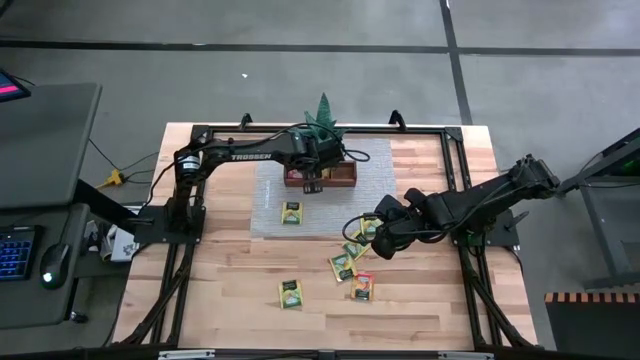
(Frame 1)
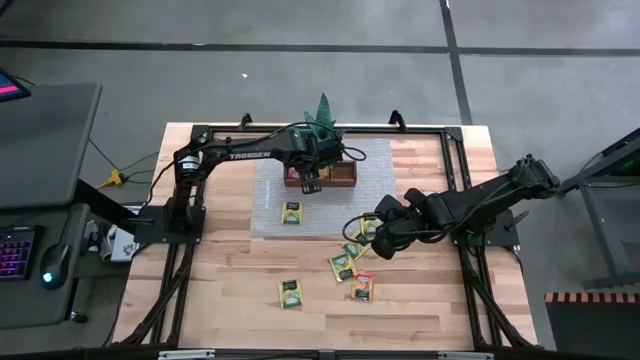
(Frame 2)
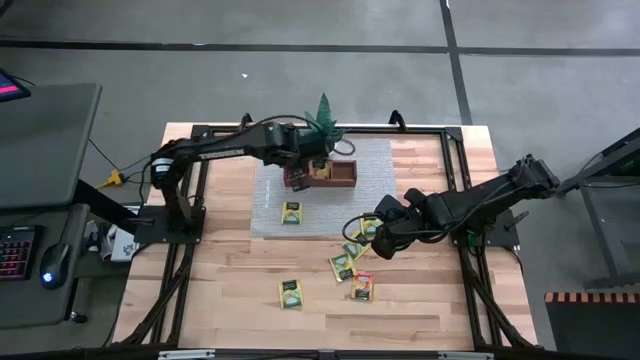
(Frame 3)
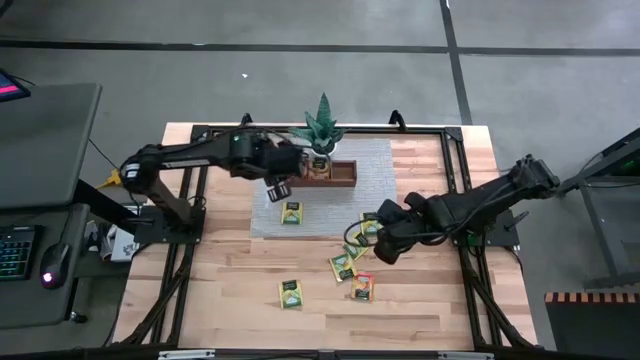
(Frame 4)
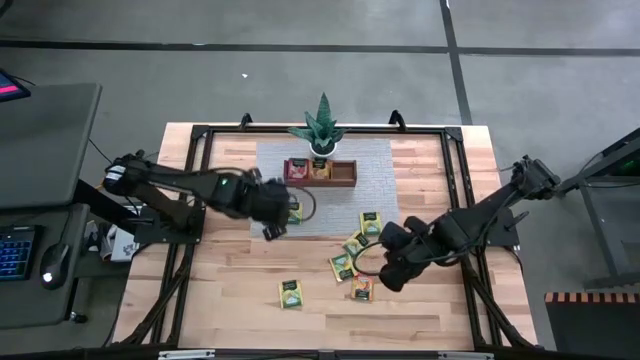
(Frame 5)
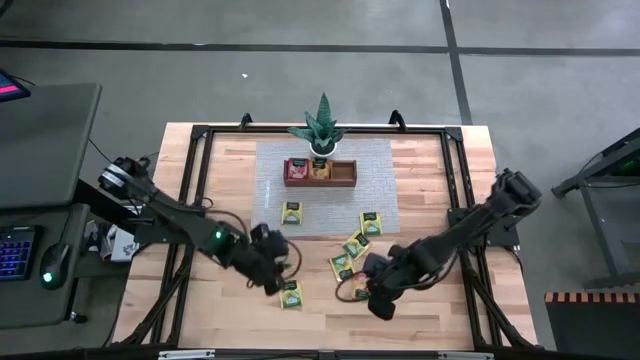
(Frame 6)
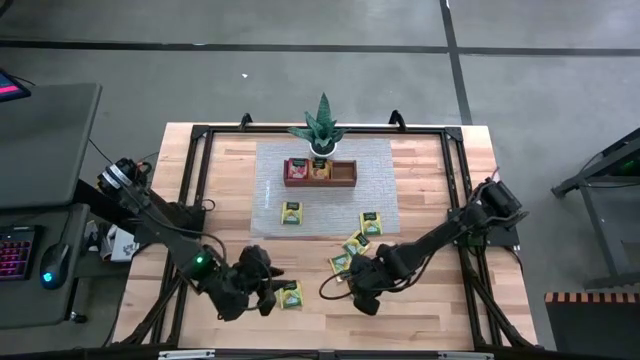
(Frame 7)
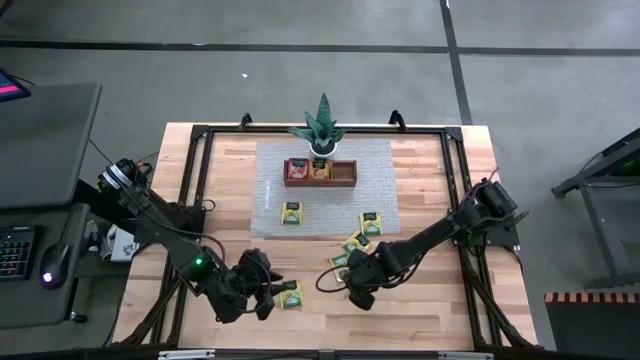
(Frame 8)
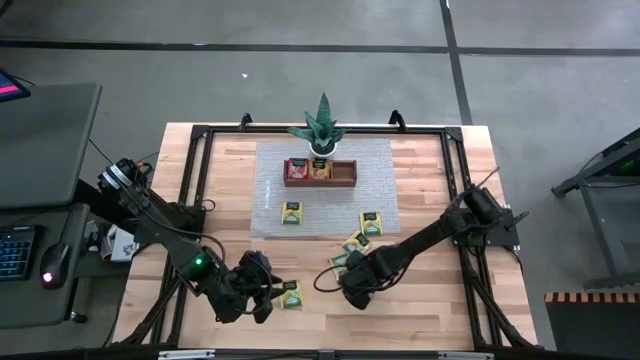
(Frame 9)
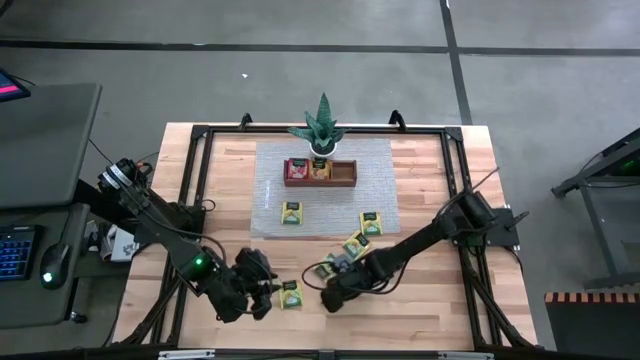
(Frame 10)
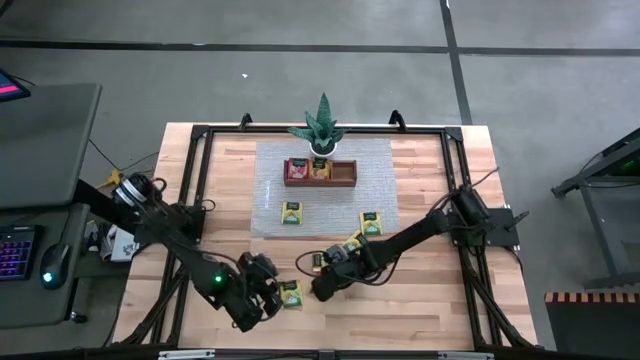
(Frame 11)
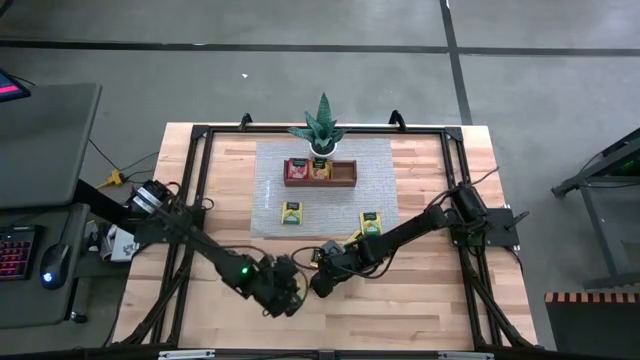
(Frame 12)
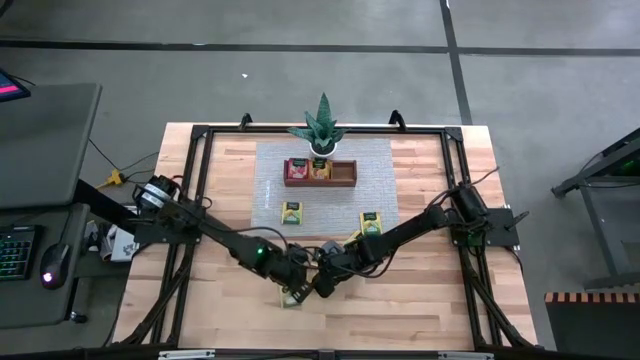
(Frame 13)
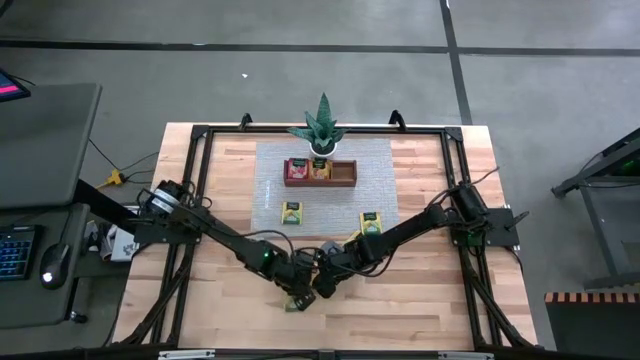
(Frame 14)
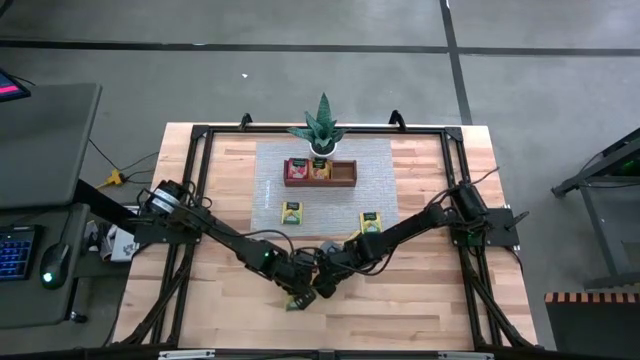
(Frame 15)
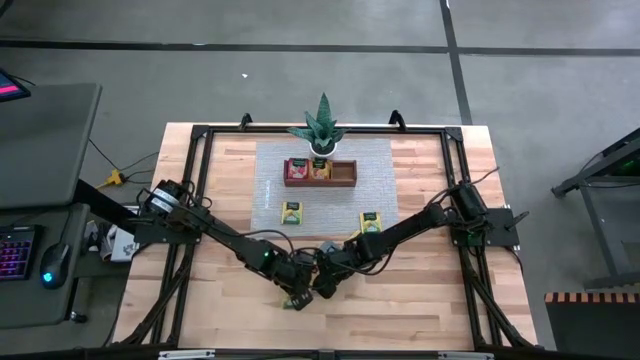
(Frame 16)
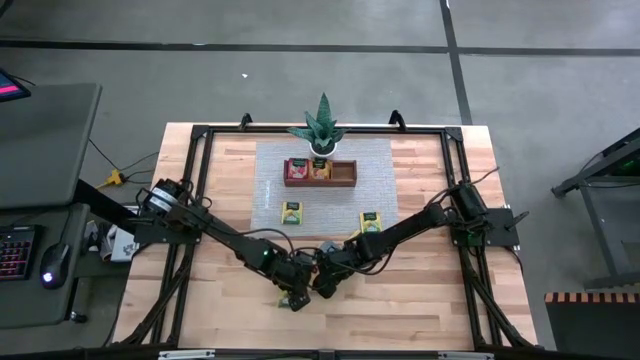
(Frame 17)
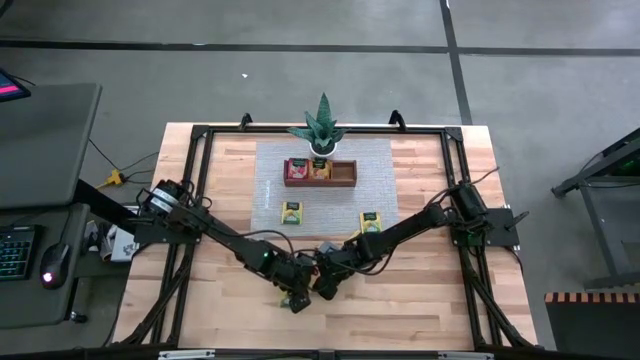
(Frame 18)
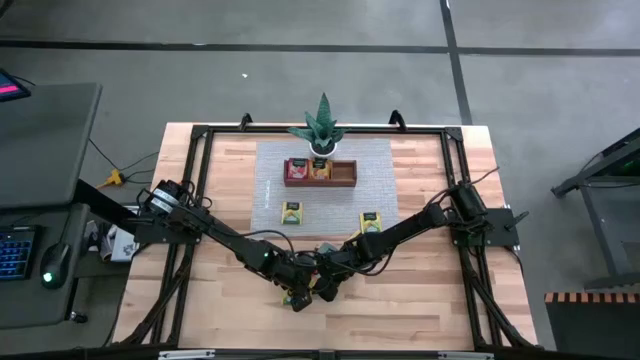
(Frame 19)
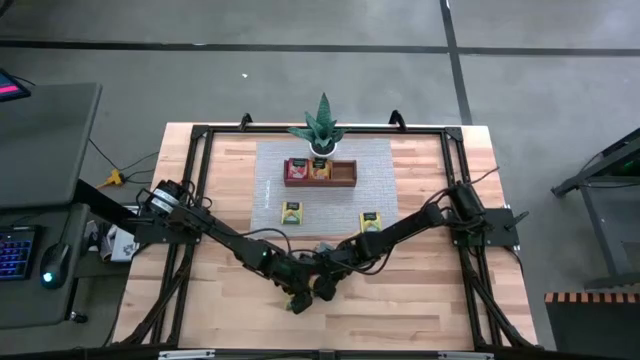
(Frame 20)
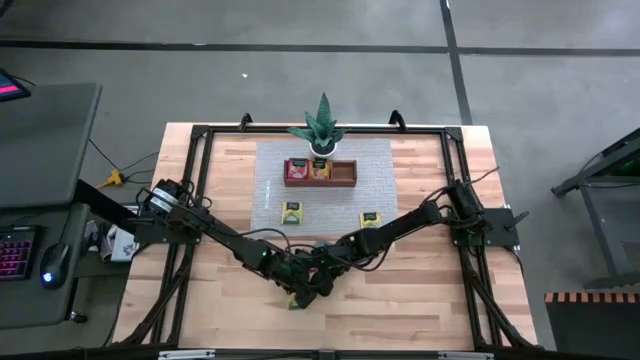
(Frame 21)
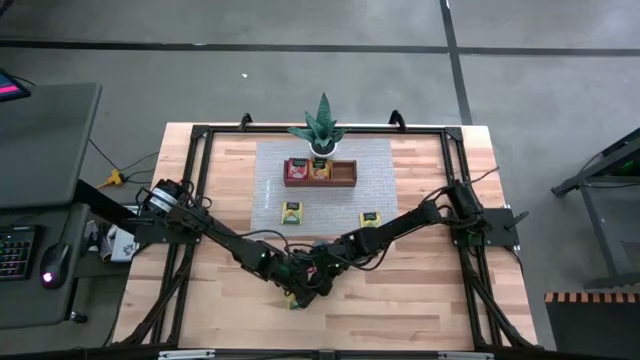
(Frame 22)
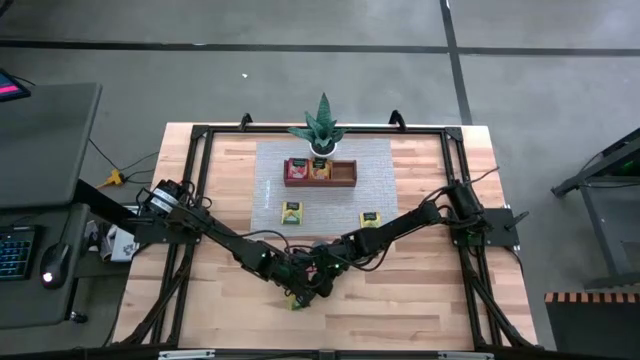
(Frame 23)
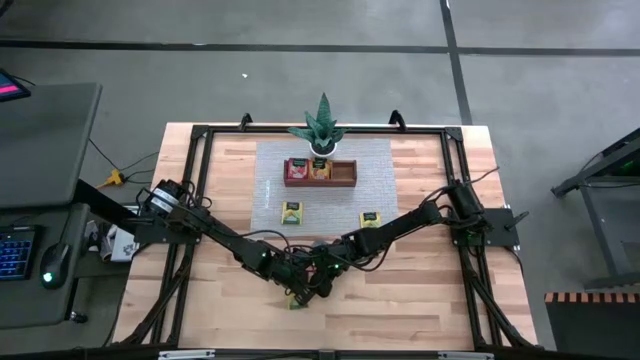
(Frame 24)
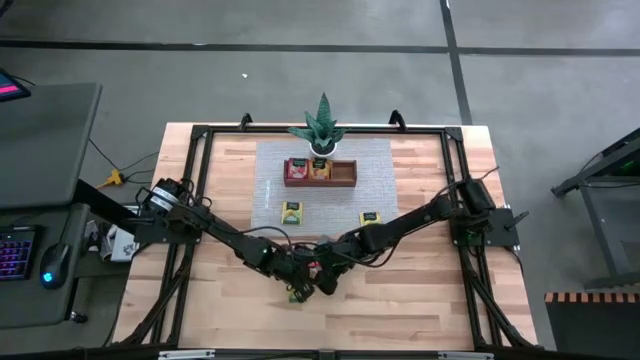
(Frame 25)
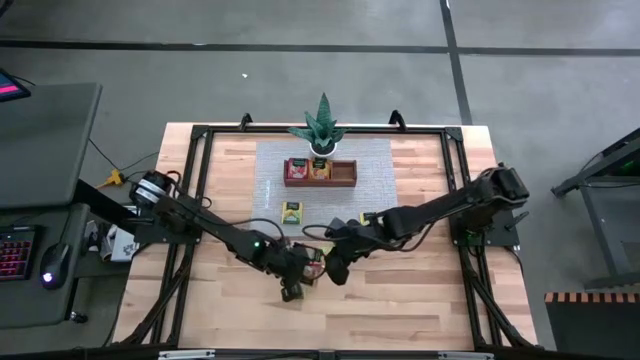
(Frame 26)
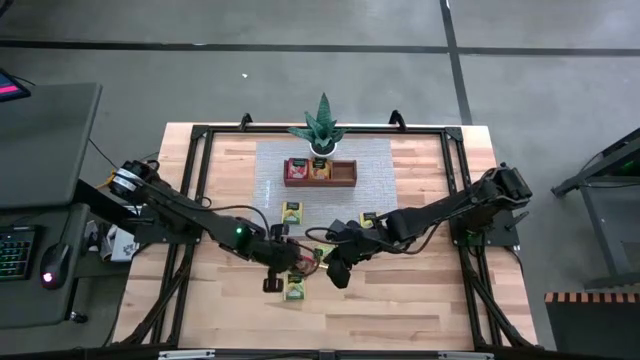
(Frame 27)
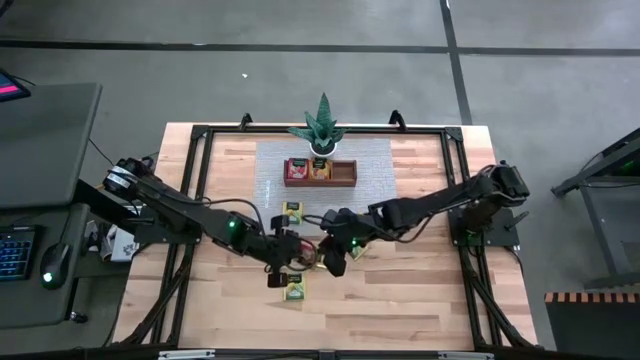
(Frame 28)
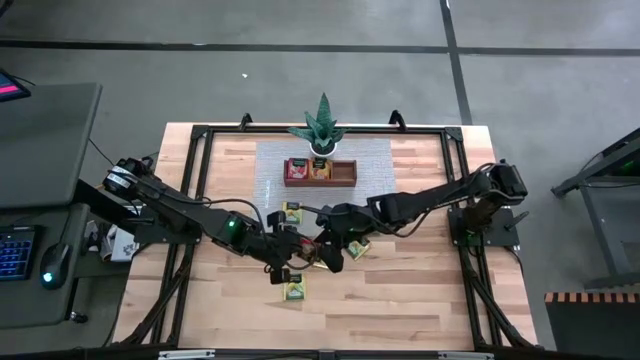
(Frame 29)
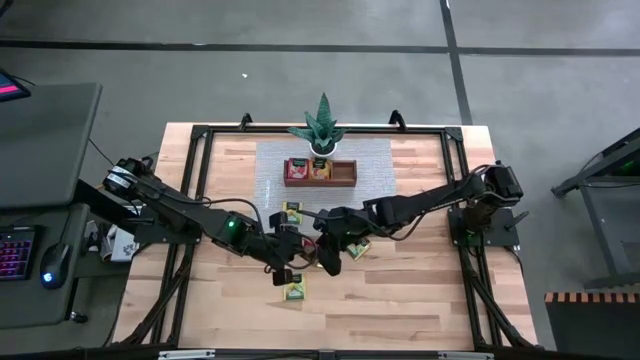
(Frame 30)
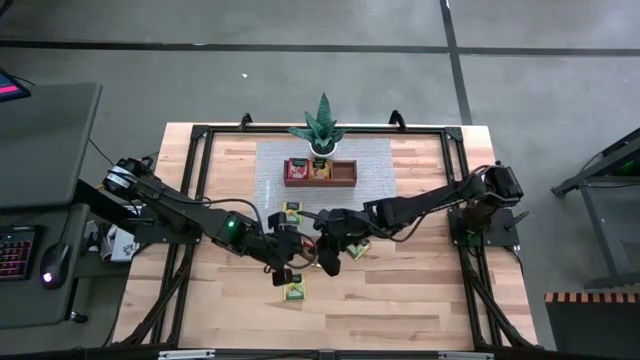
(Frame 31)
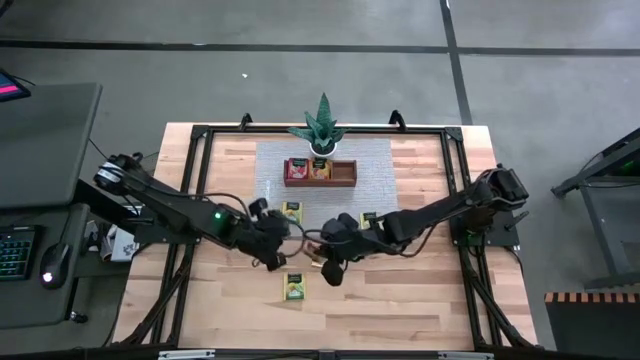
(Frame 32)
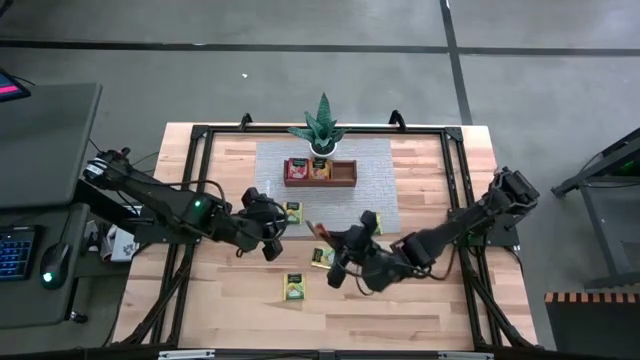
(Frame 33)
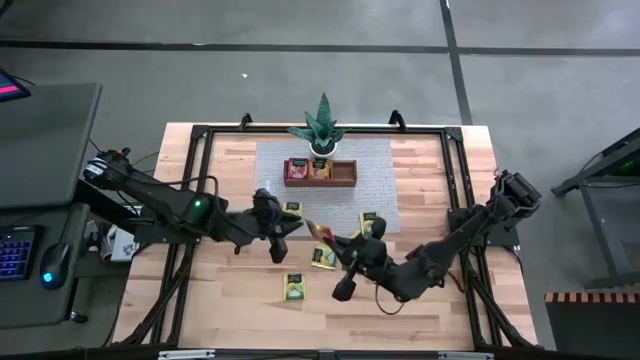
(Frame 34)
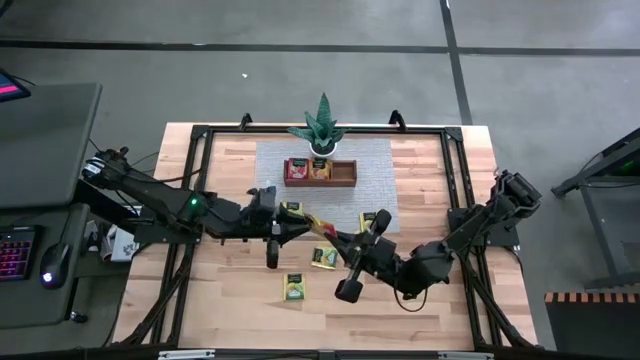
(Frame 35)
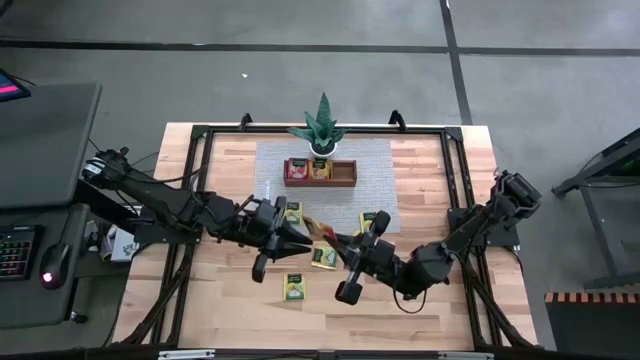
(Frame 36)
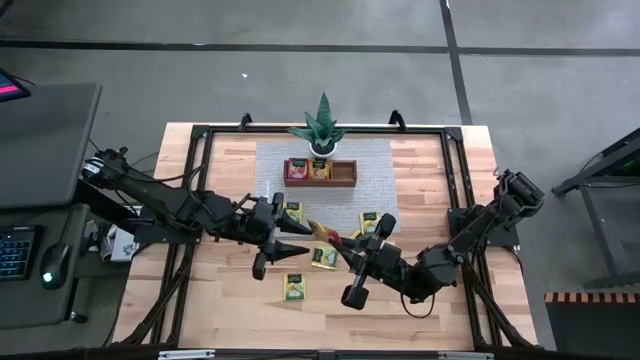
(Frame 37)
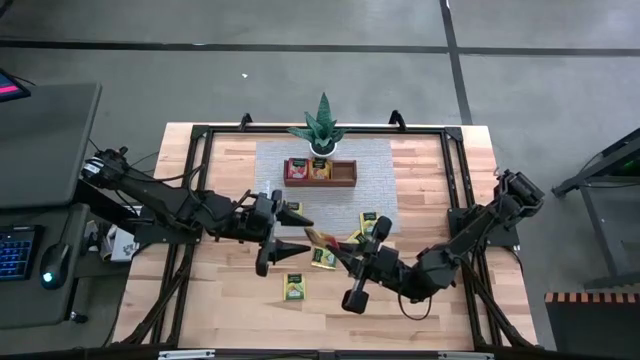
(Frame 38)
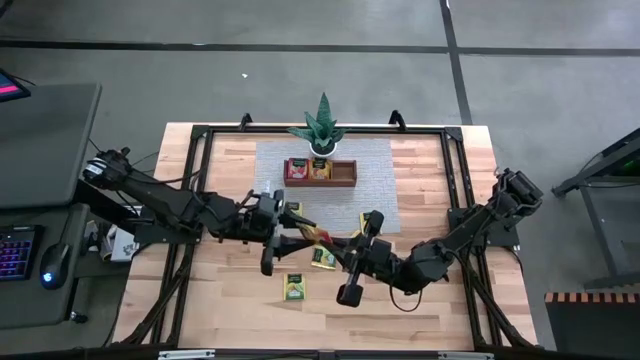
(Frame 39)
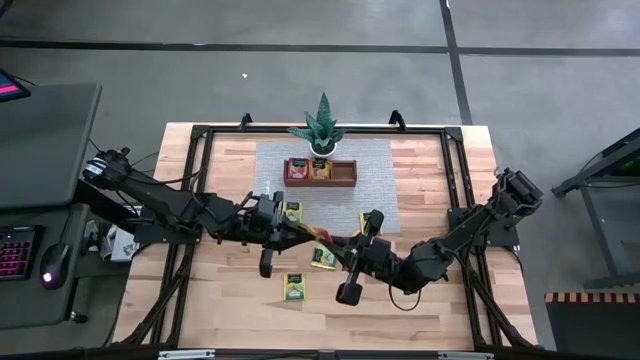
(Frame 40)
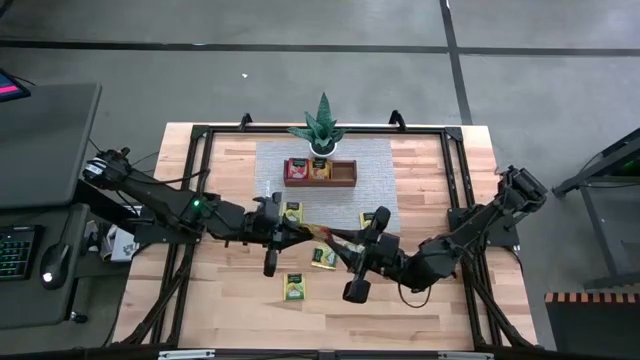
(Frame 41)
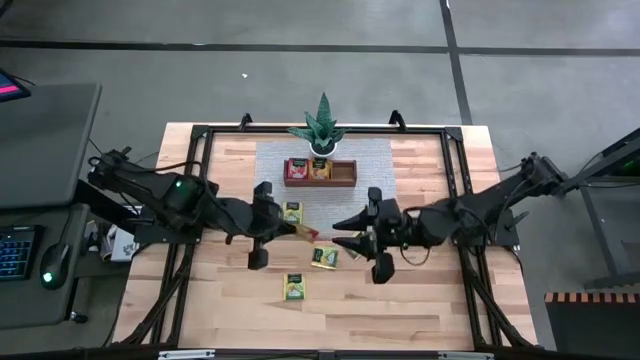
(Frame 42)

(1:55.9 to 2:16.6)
Task: Pick & Place Tea
Put the orange tea bag into the middle section of the wooden organizer

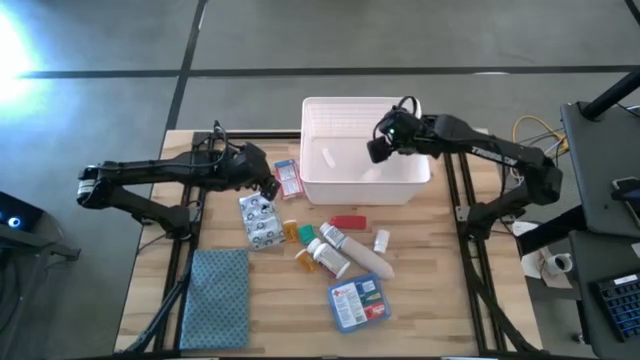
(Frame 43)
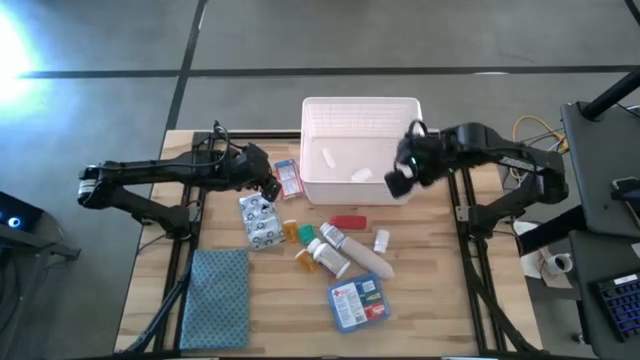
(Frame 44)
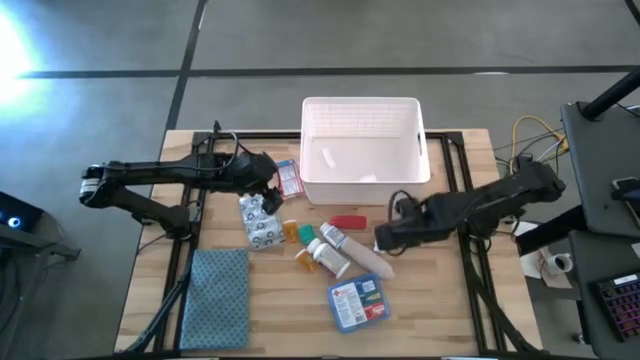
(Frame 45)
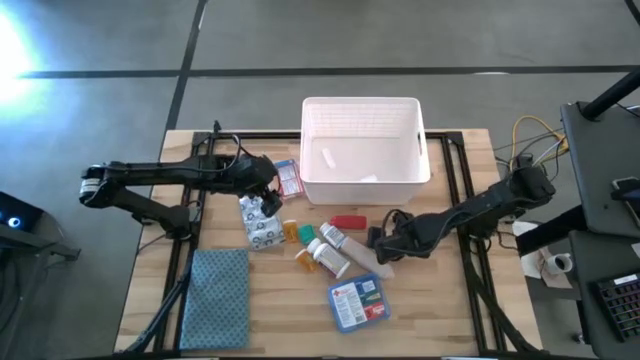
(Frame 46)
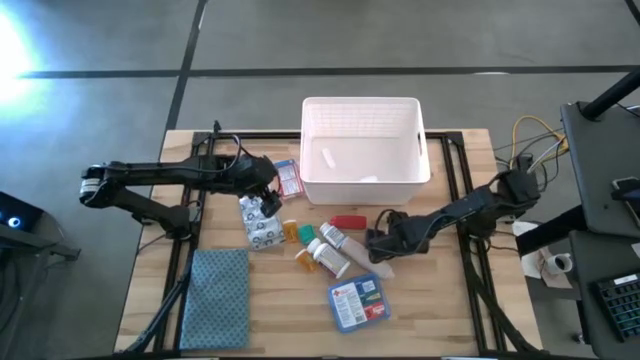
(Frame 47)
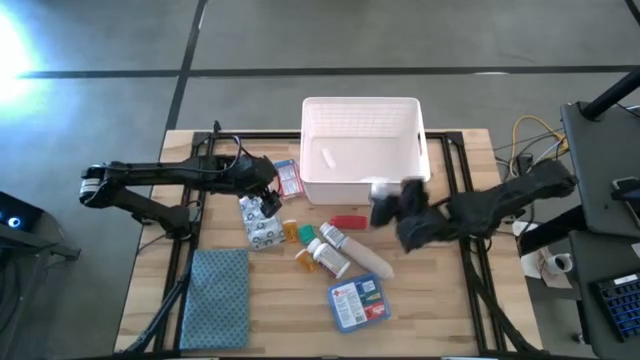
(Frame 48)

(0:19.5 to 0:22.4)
Task: Pick & place medical supplies in basket/bin
Put the white medicine bottle into the bin
